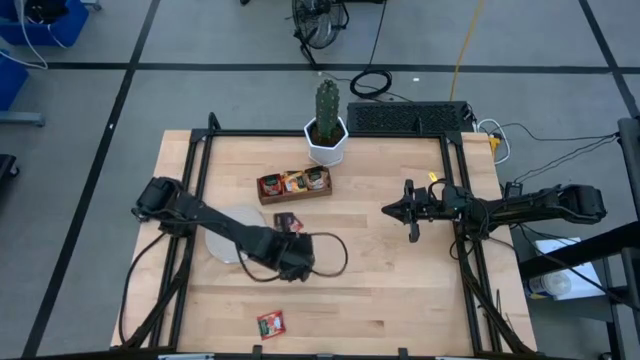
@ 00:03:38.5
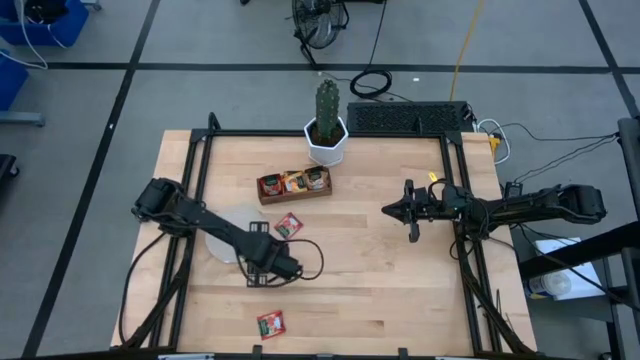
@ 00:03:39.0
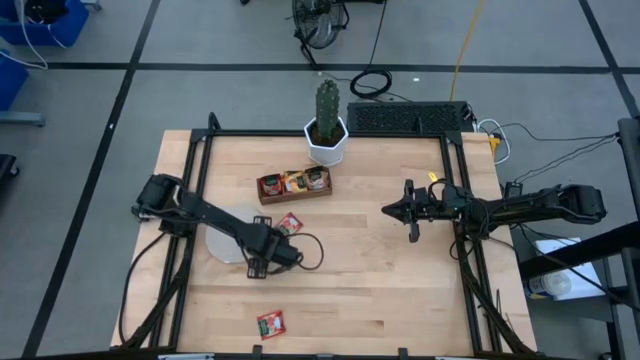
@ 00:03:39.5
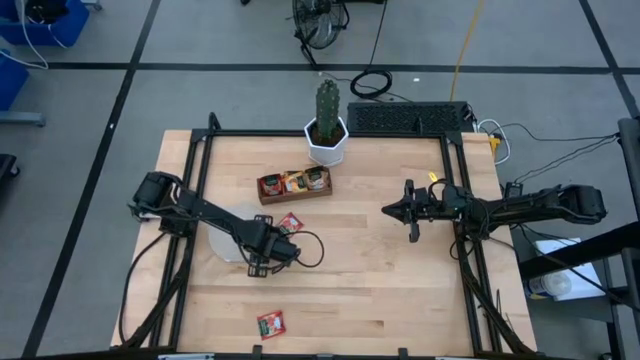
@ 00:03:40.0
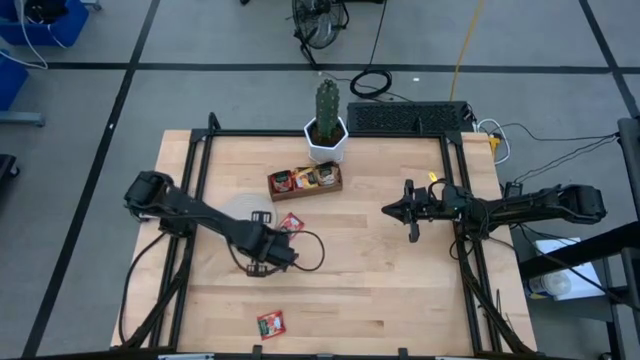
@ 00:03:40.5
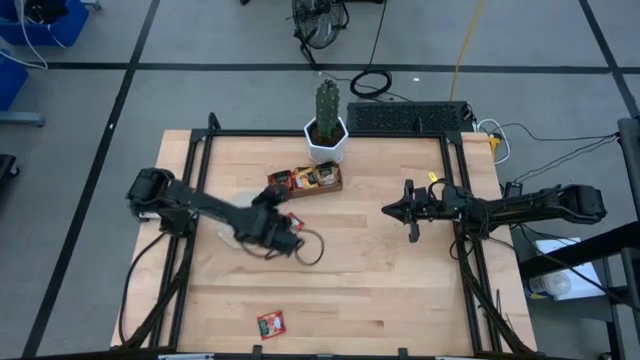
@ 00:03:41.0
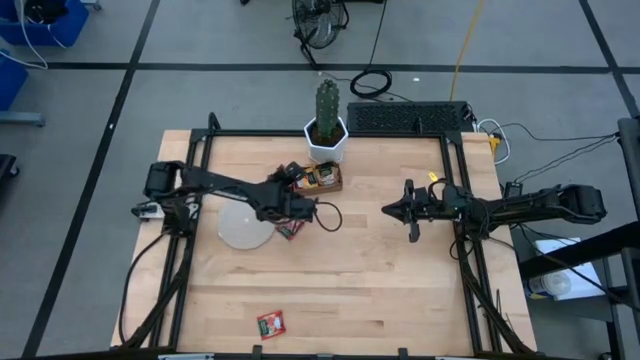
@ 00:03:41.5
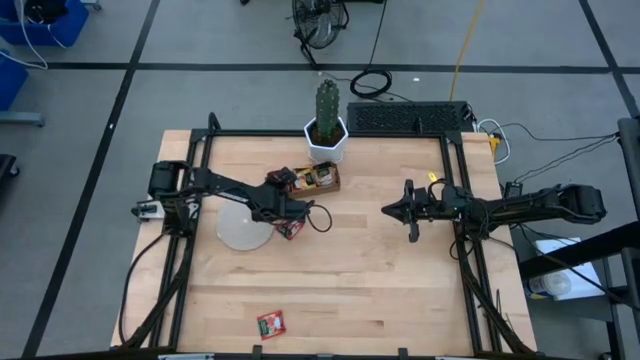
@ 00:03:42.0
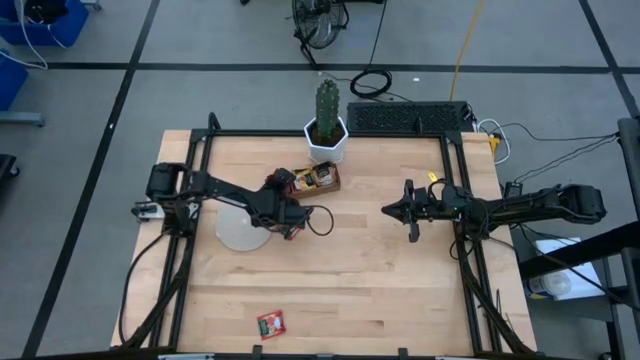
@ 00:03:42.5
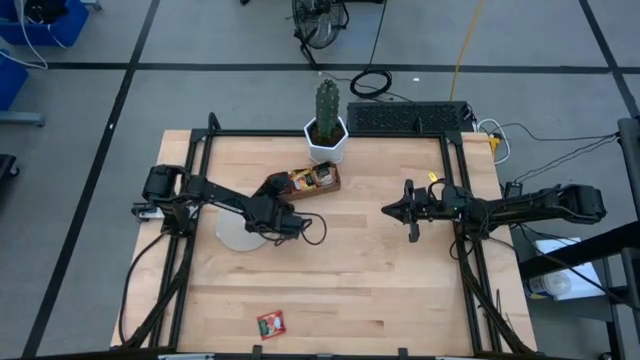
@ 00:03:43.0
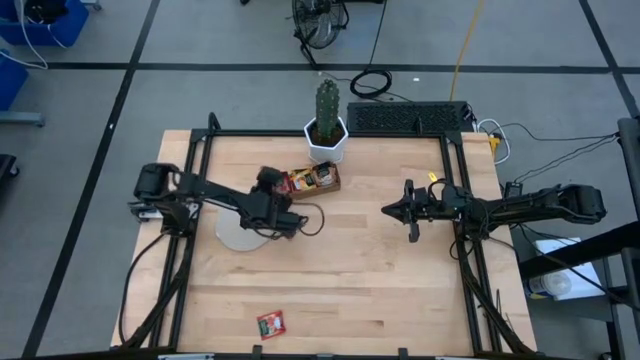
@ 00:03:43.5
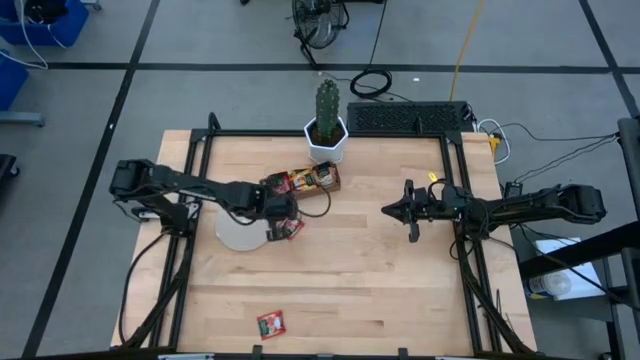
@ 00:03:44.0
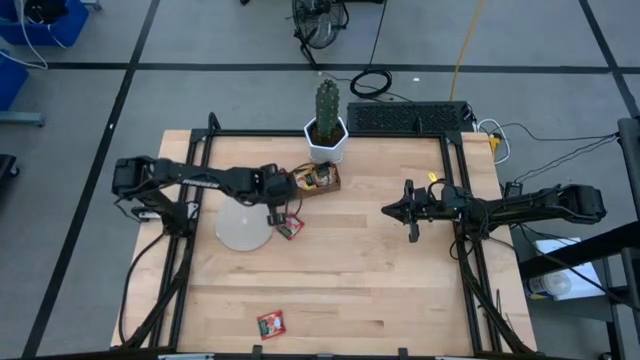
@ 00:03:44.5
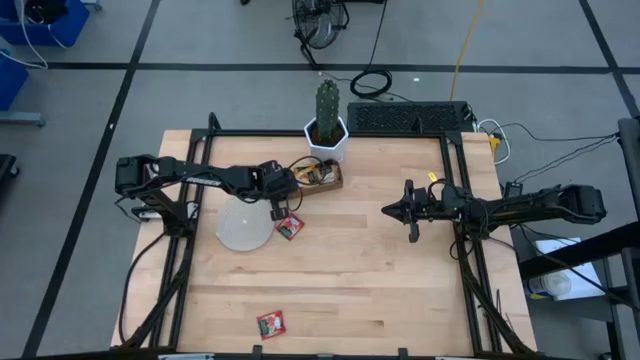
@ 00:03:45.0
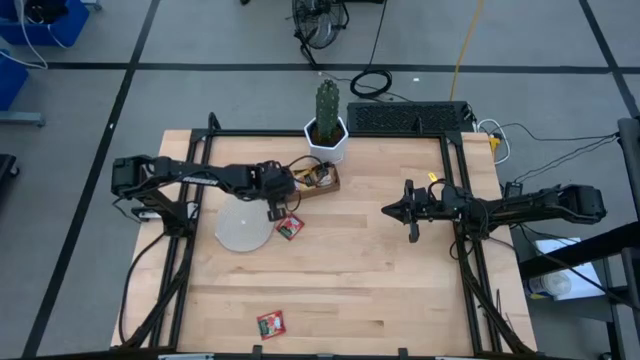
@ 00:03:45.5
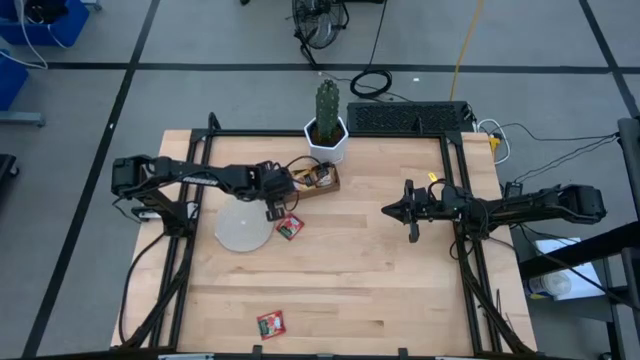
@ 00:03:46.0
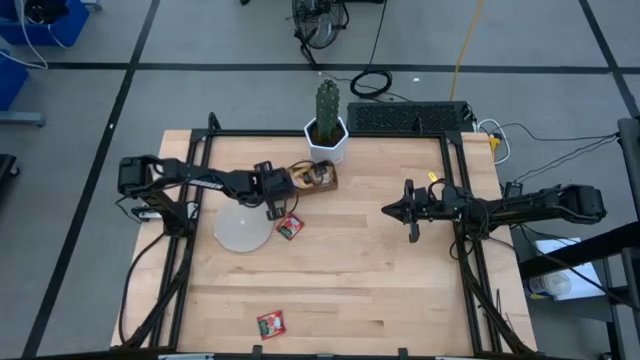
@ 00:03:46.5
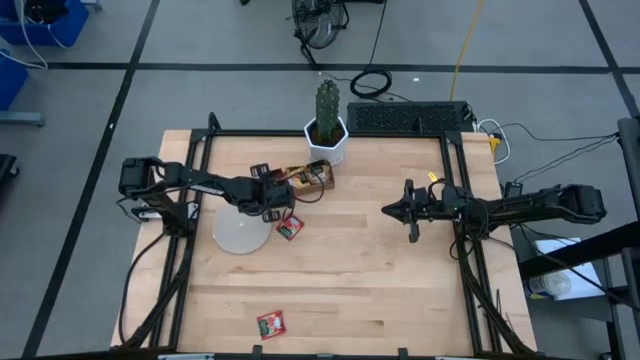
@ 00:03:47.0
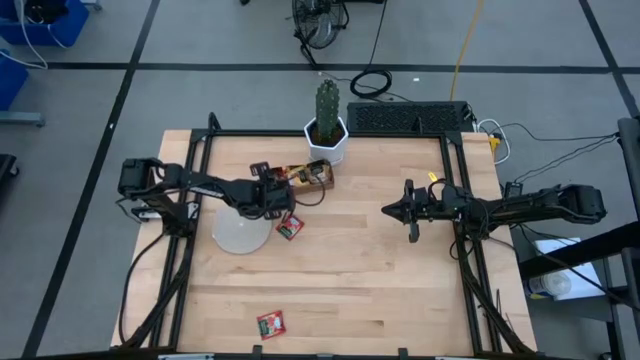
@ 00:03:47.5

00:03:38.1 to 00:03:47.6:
Task: Pick & Place Tea
Put the red tea bag into the left section of the wooden organizer

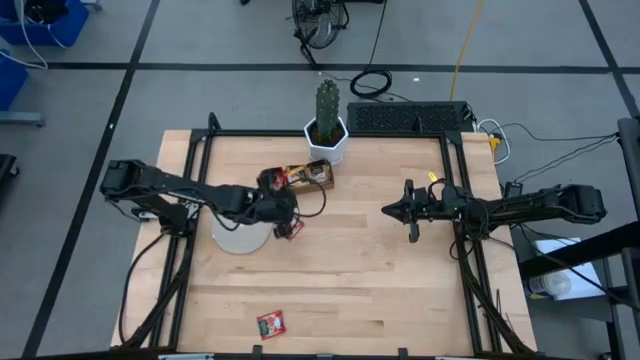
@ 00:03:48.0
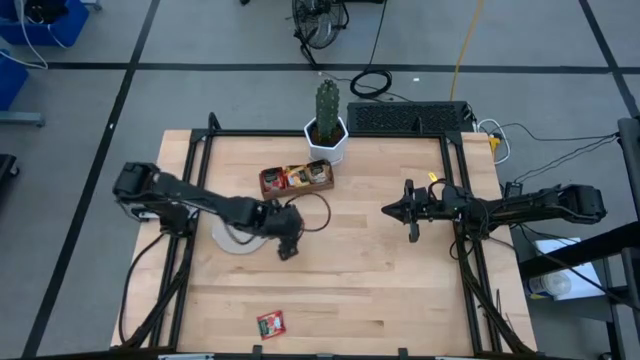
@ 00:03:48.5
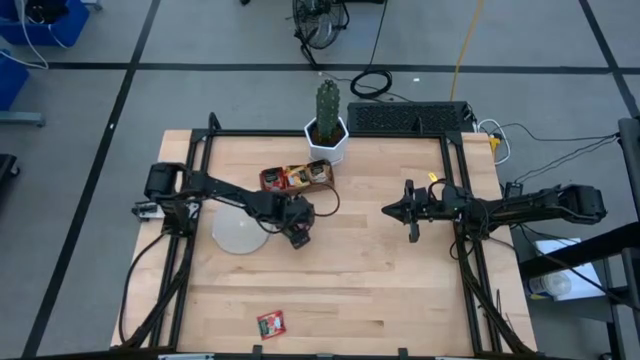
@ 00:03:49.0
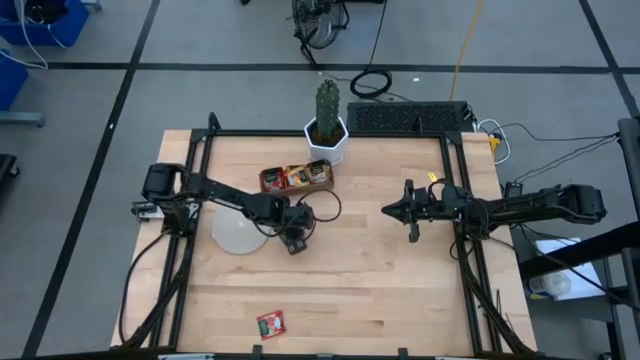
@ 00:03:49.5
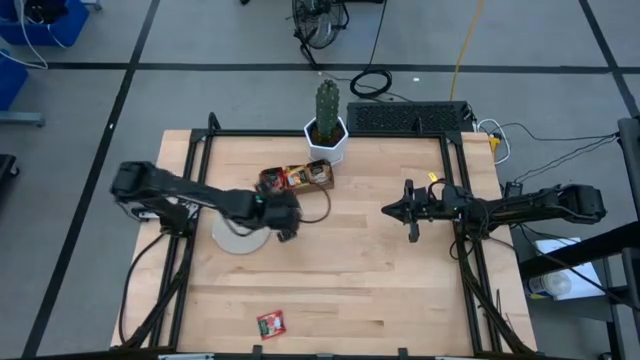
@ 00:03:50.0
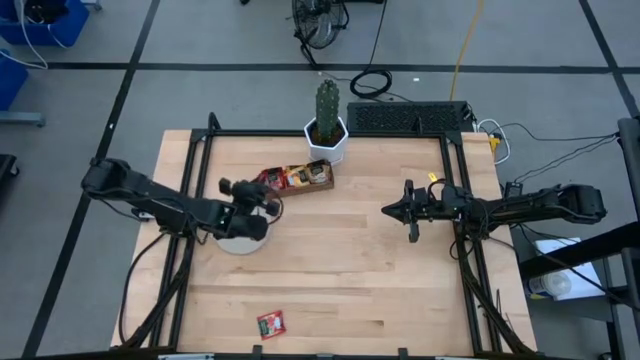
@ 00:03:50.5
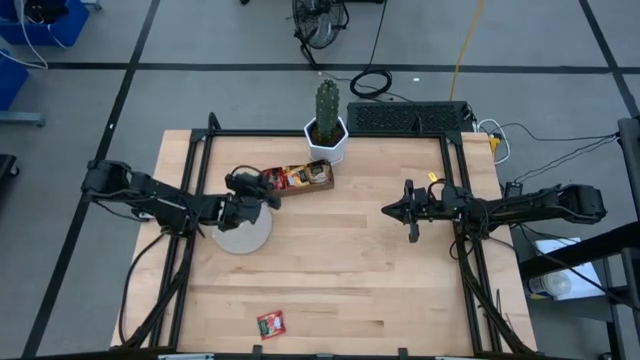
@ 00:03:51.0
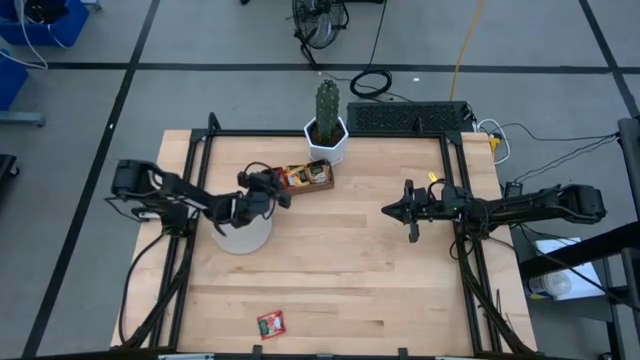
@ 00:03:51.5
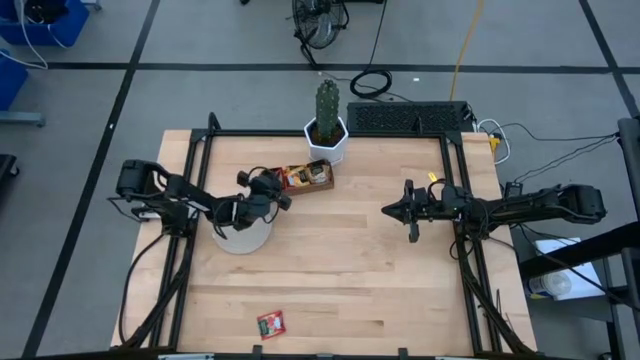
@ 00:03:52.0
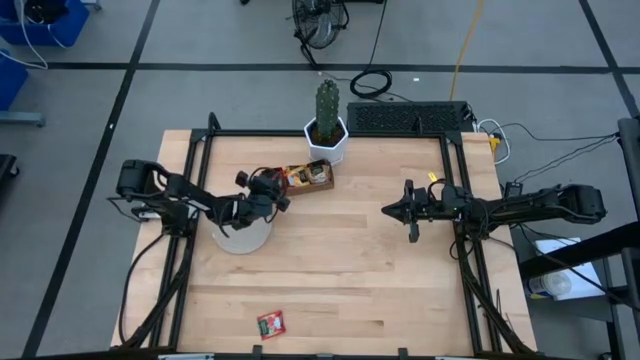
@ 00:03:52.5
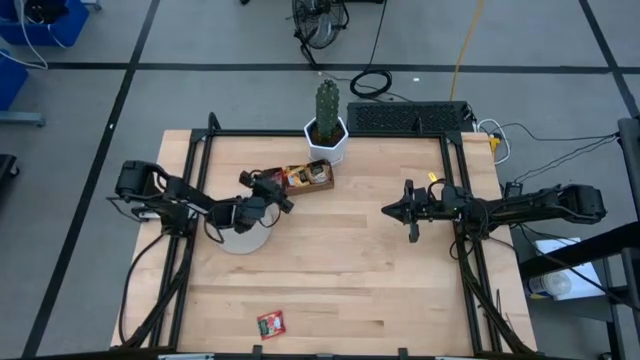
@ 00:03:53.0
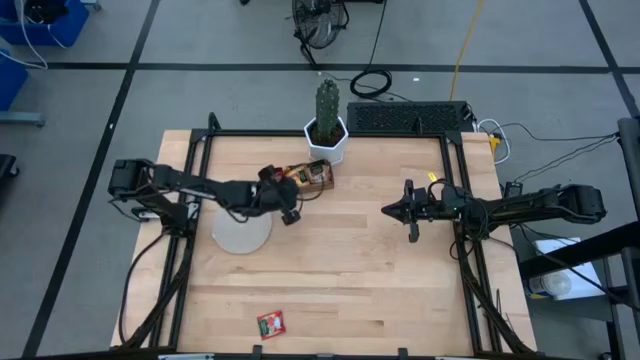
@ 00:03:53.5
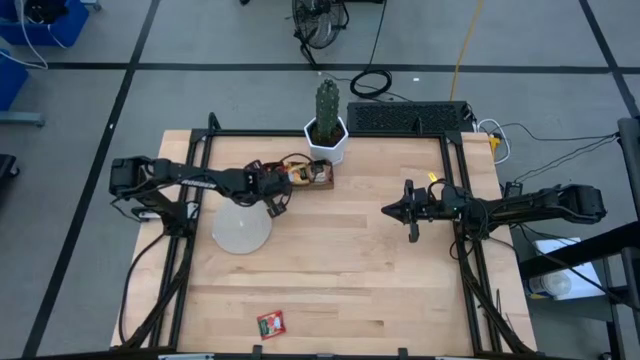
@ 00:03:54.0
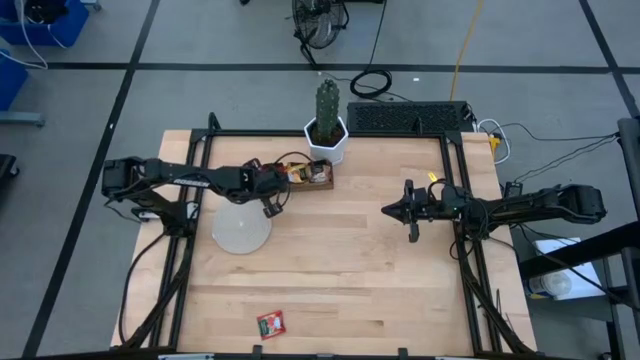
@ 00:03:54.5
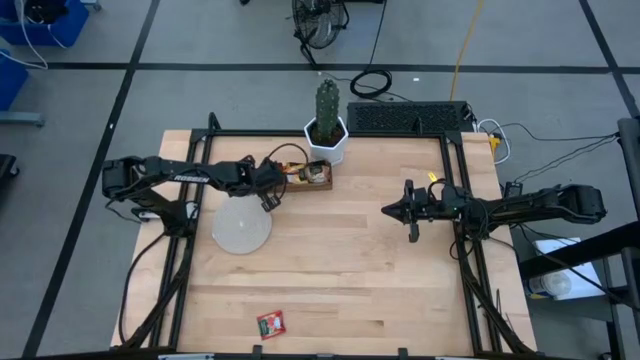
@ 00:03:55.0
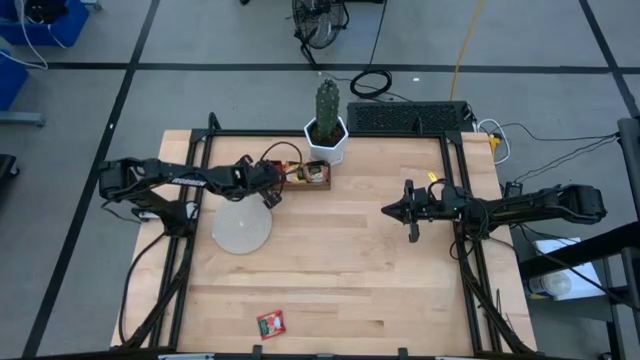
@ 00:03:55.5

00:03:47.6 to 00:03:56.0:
Put the red tea bag into the left section of the wooden organizer

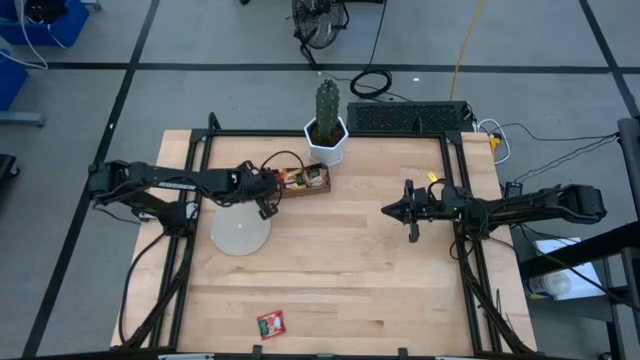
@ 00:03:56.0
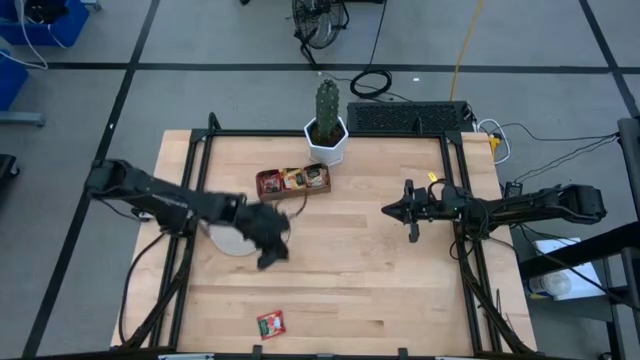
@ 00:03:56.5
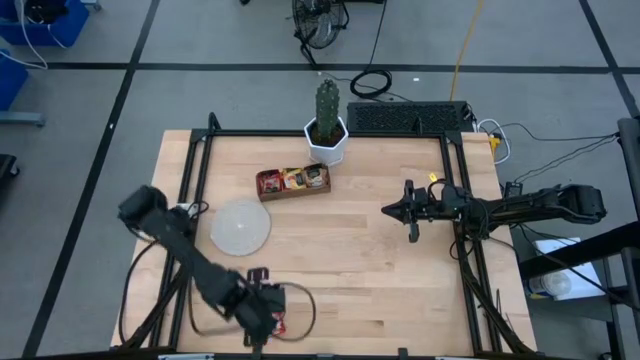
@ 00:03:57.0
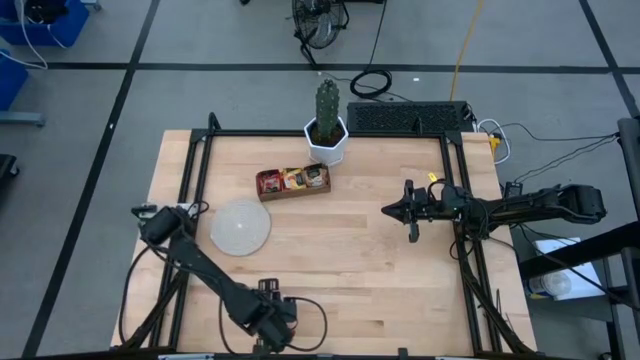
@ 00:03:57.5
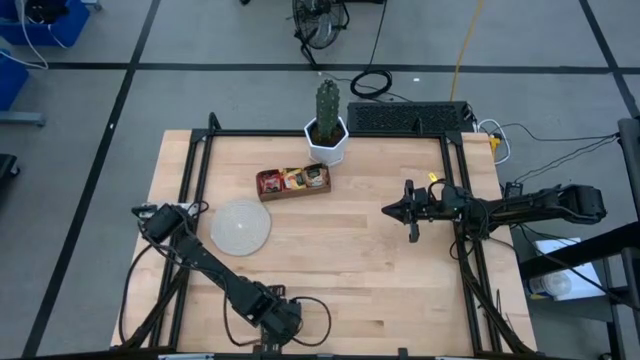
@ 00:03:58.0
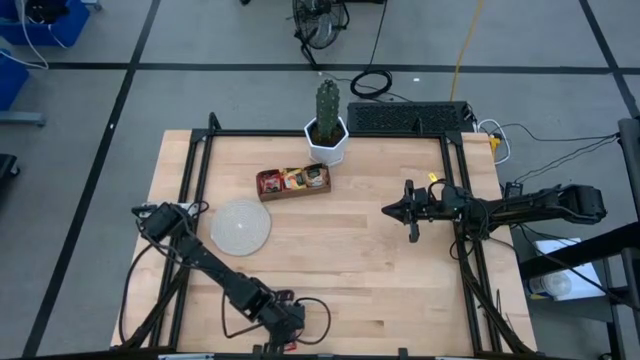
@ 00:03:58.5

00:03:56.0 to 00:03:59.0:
Put the red tea bag into the left section of the wooden organizer
